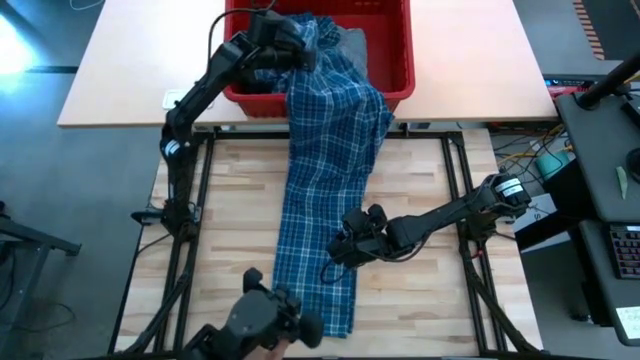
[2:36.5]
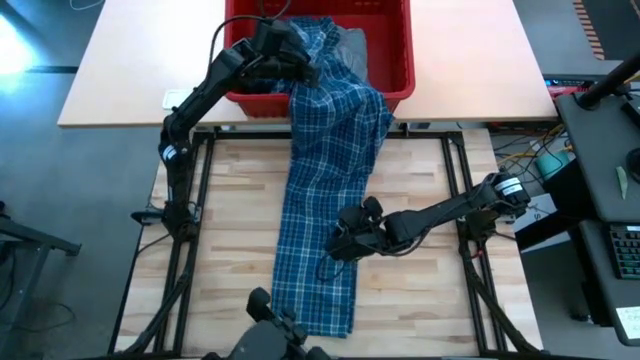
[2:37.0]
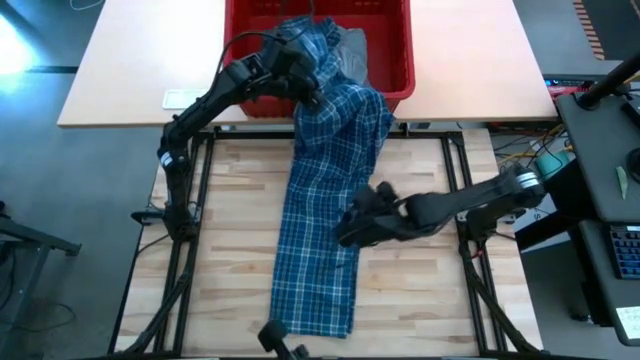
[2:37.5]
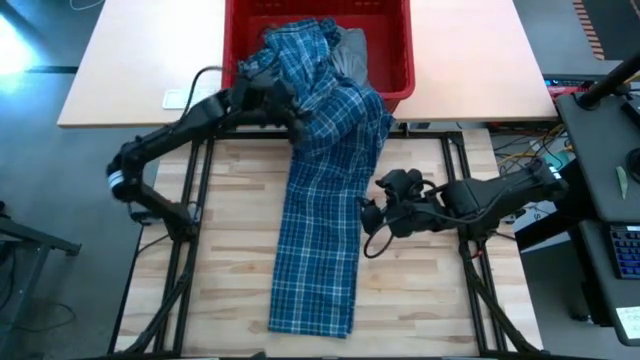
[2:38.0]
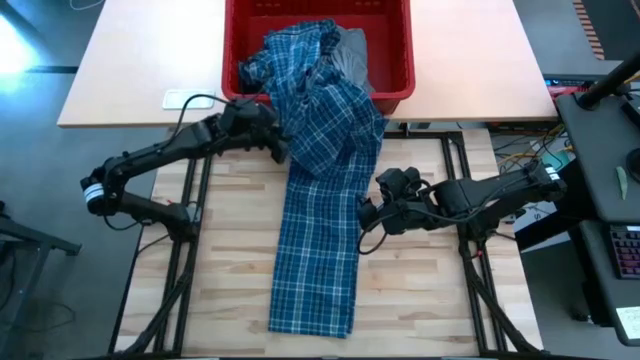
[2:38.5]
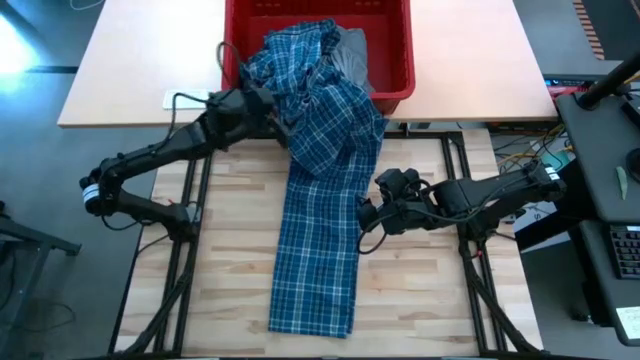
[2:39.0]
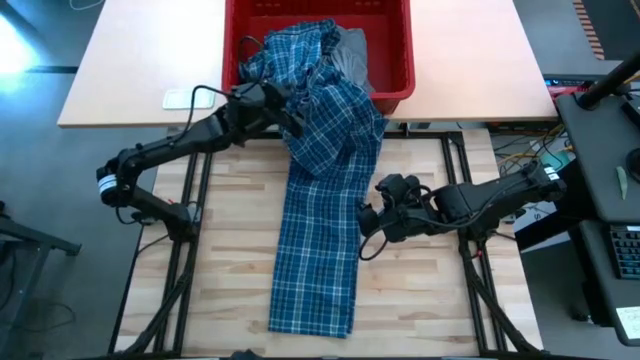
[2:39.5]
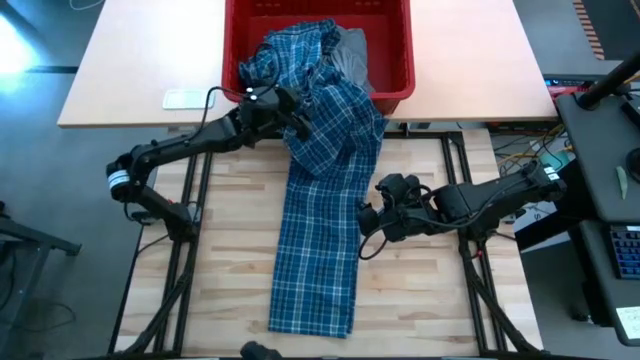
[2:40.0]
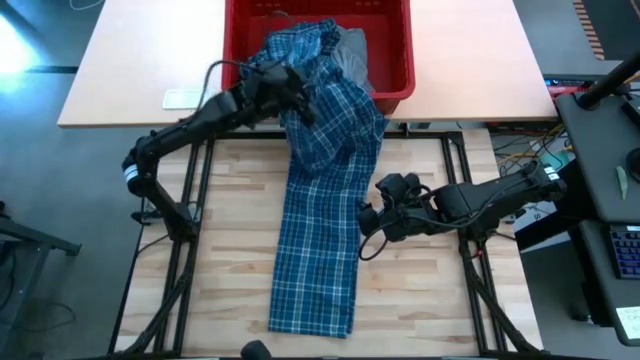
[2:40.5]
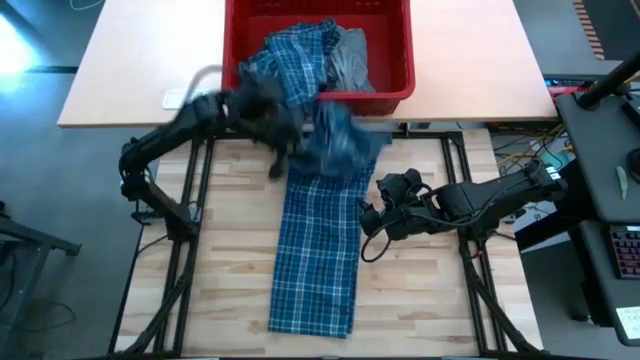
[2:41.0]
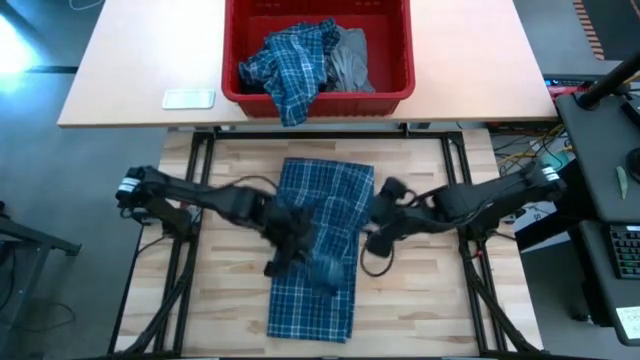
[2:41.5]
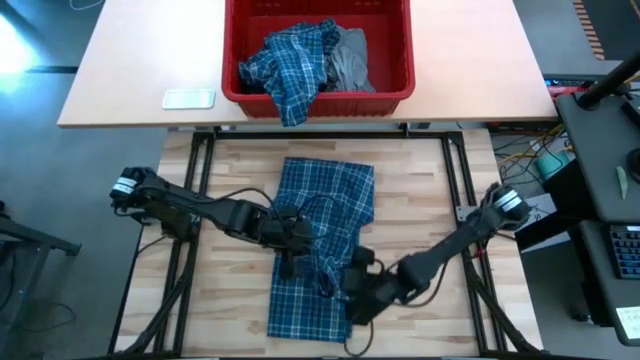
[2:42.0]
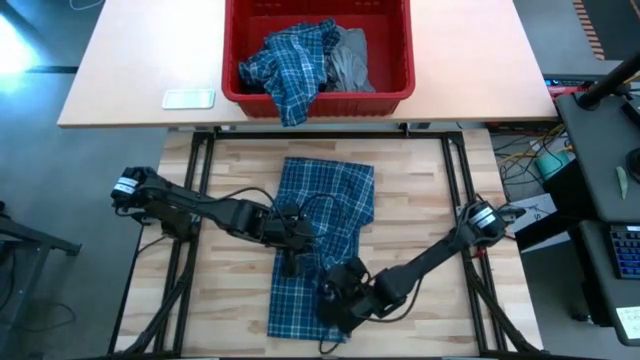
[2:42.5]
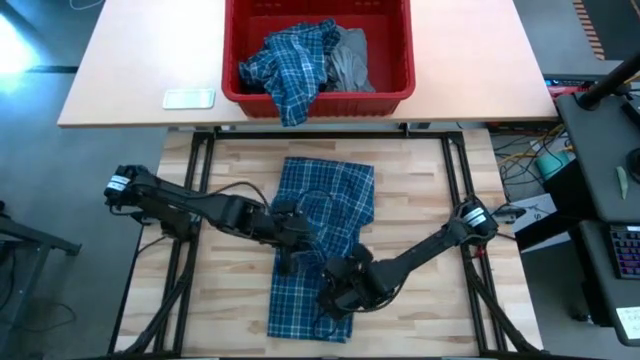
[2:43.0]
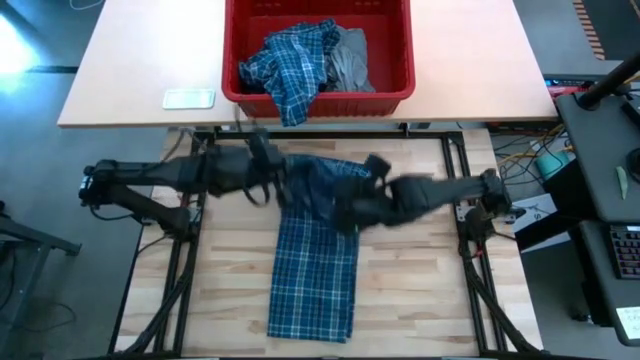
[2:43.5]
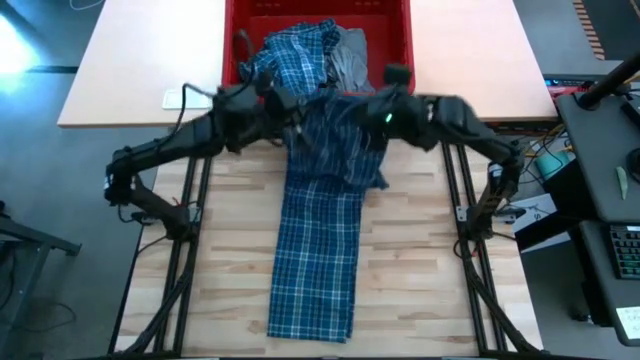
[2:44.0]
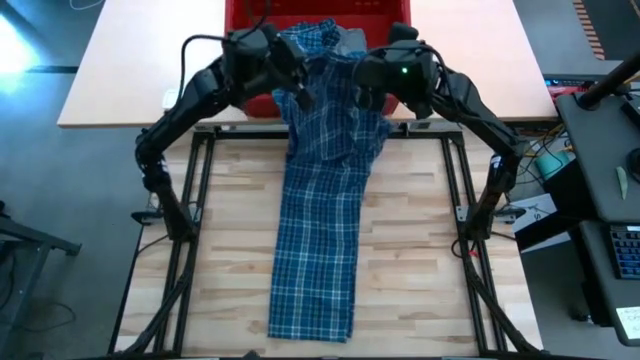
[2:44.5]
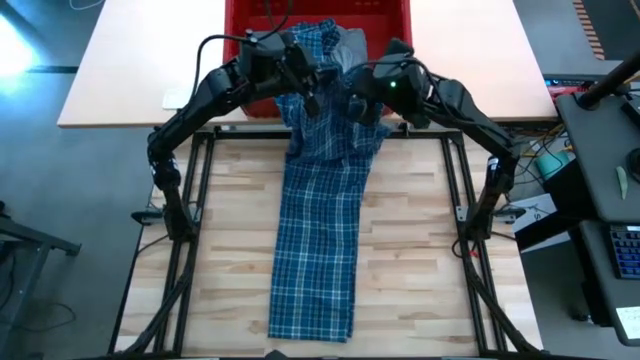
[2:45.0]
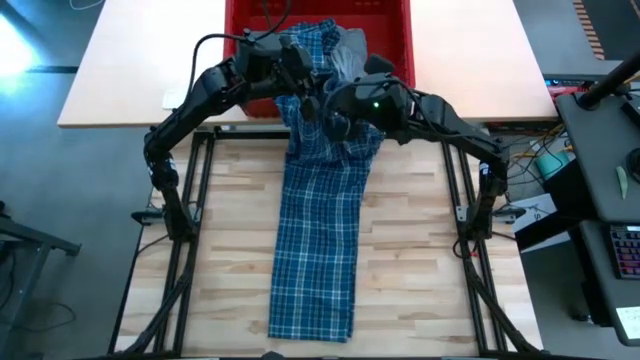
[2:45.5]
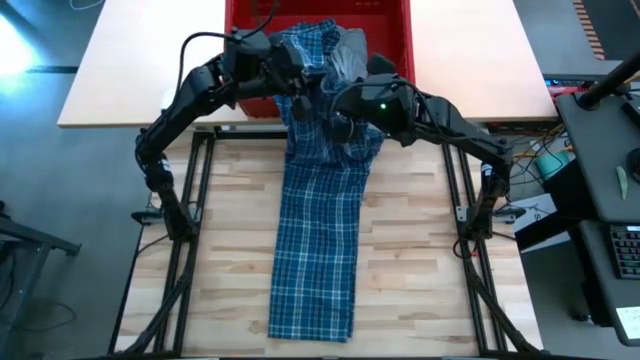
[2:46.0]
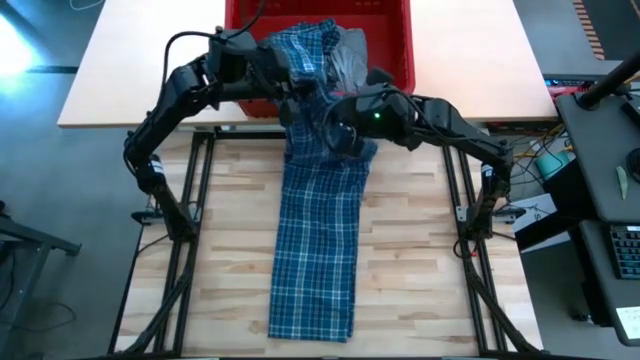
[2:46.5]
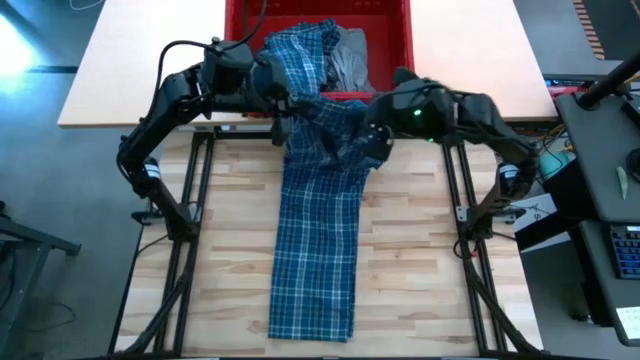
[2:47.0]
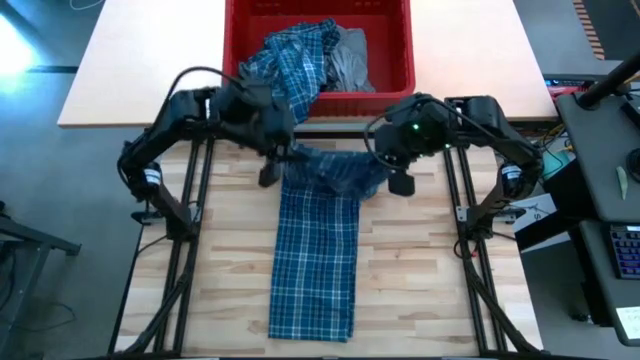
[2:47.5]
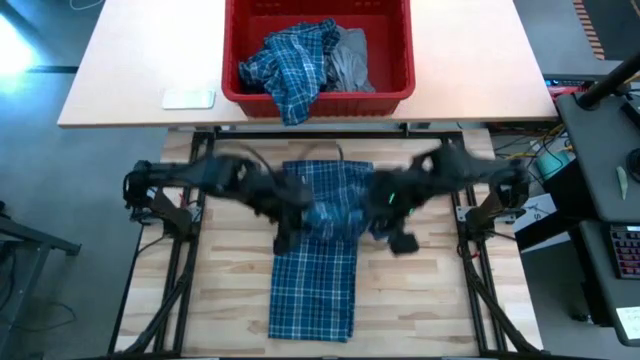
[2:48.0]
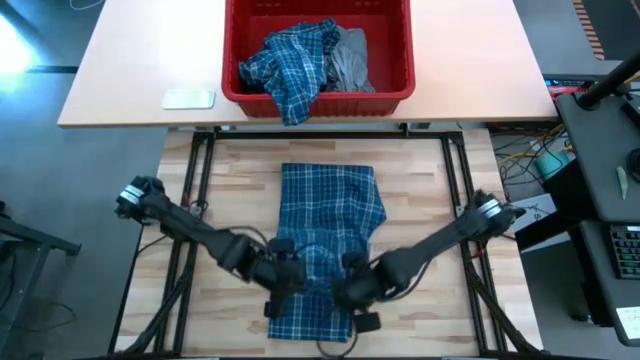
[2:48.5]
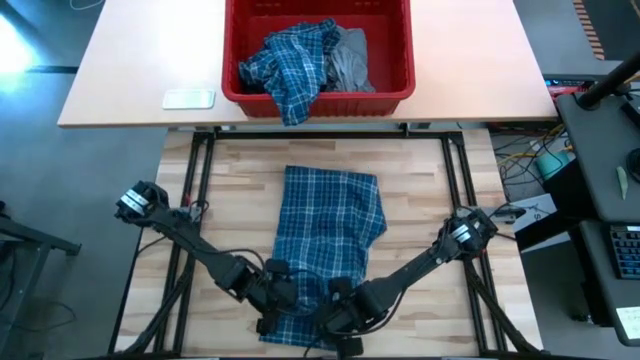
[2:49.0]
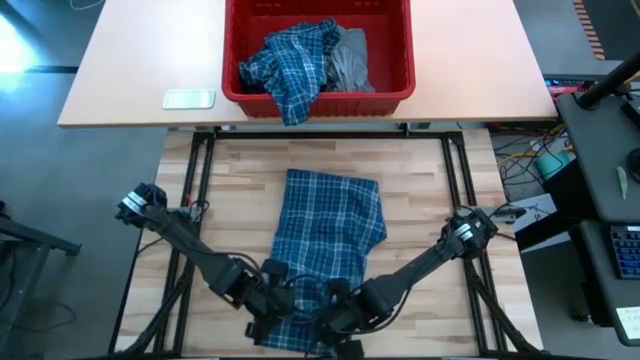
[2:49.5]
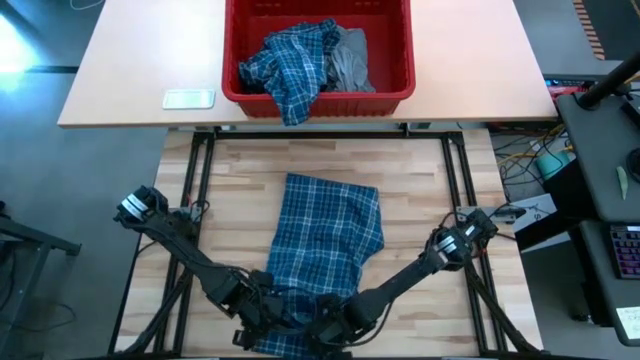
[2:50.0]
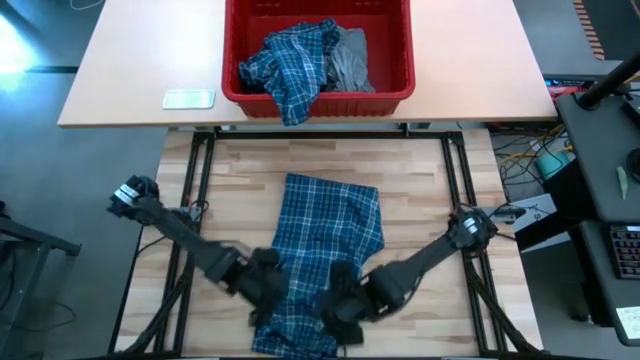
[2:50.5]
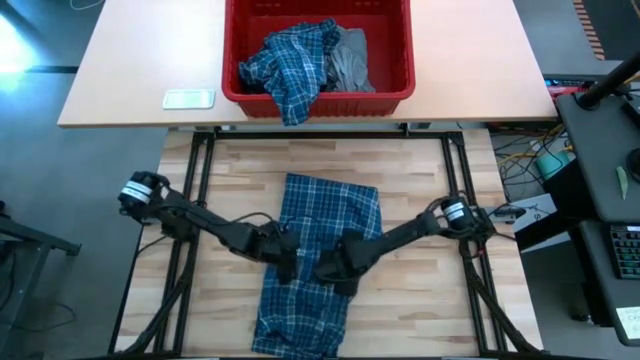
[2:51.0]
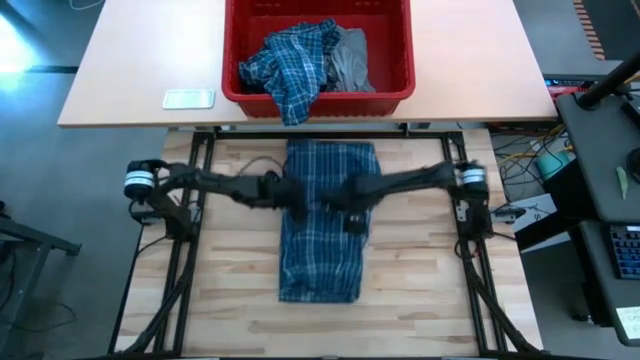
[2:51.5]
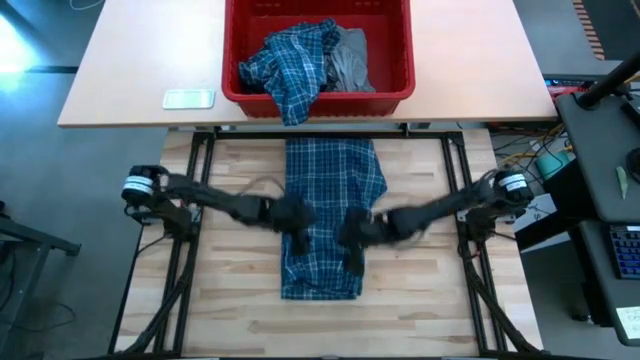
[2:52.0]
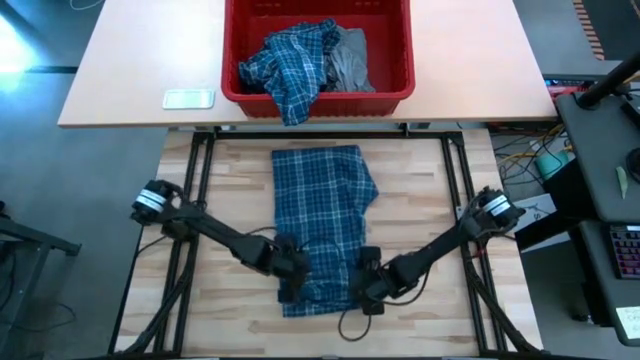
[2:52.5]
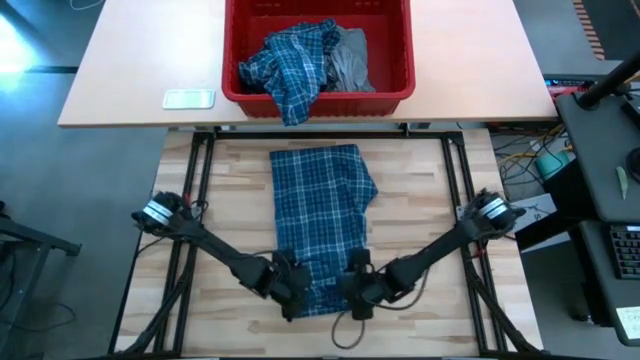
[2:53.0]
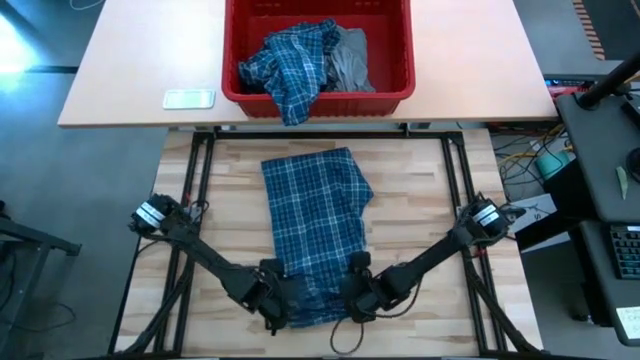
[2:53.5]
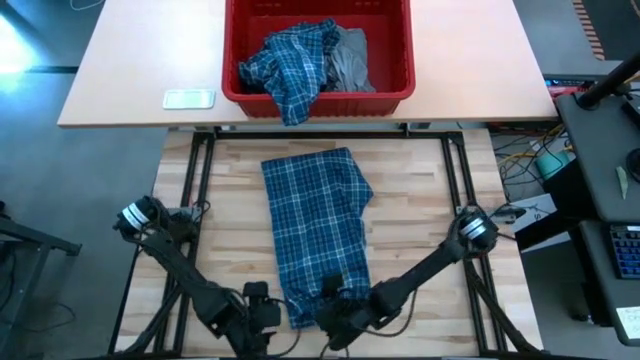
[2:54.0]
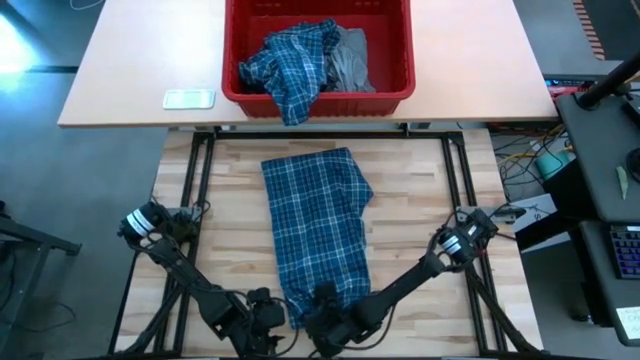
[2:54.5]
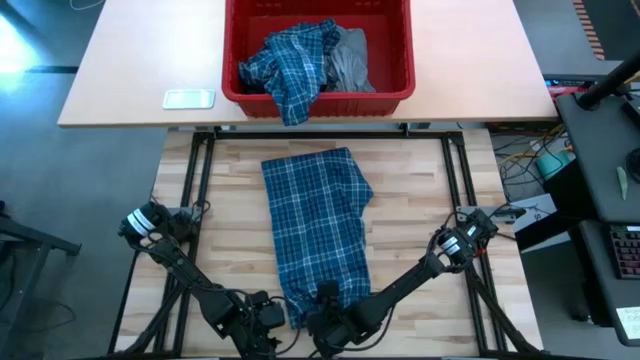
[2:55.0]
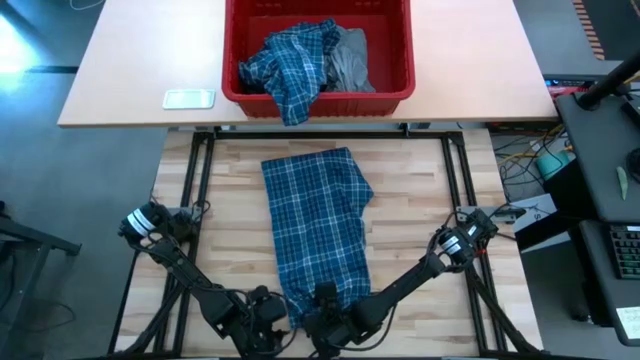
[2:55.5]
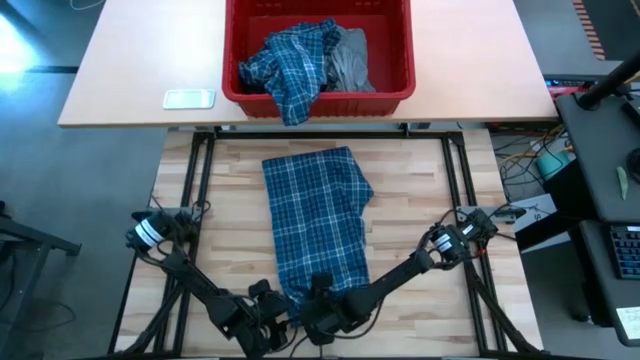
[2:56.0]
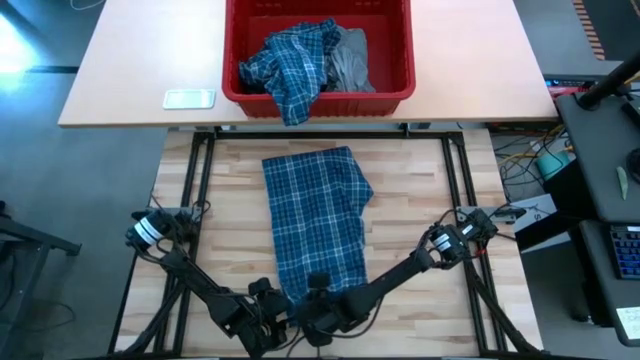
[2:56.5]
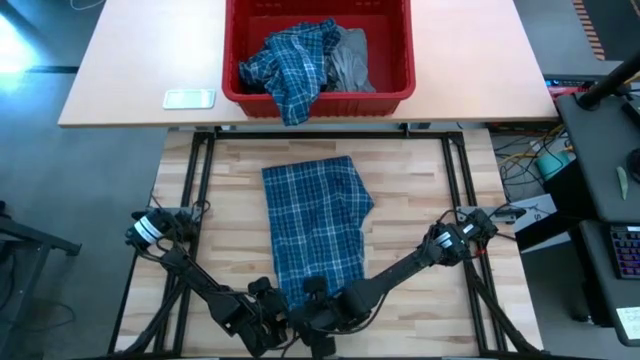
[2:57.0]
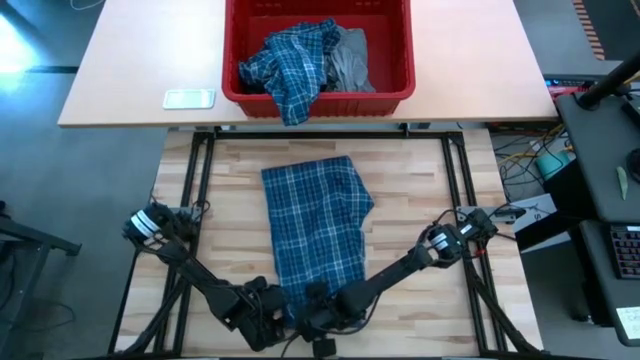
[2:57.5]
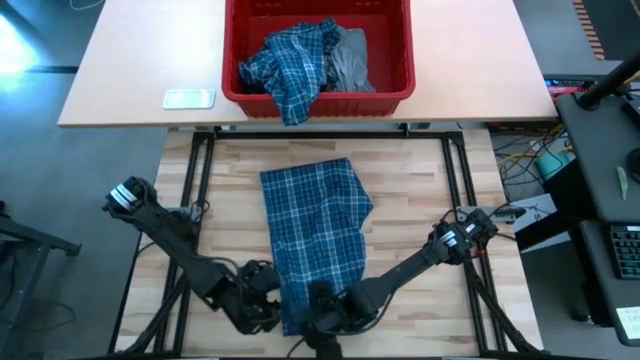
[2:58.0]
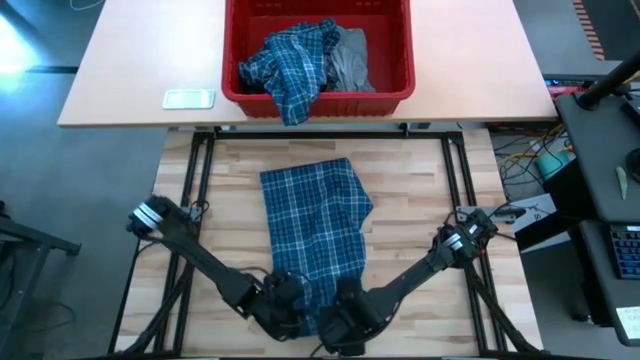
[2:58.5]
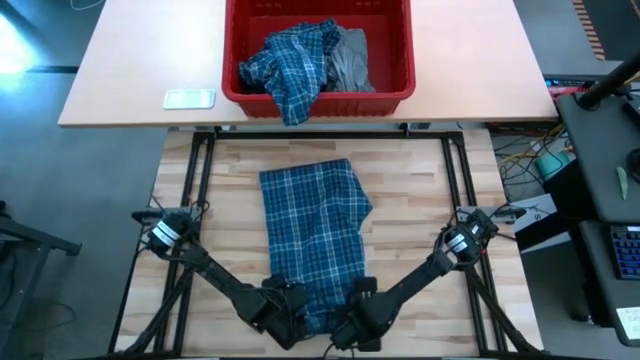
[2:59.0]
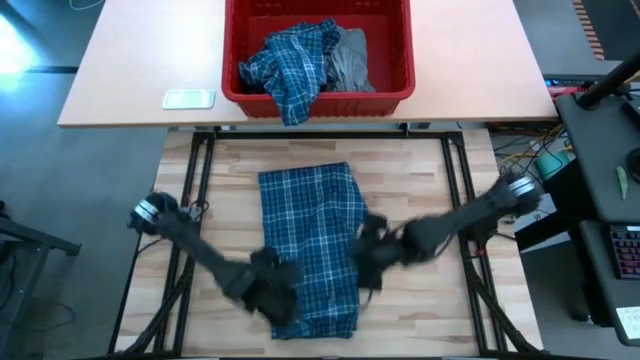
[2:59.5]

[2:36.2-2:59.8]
Task: Fold Laundry from Bin
Fold the blue patterned pants
